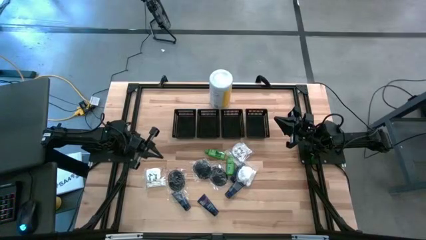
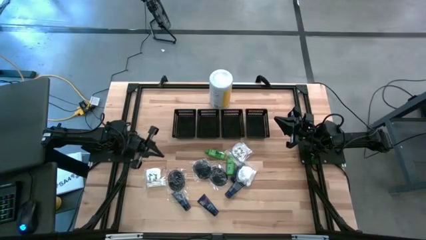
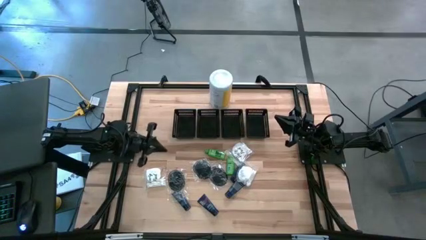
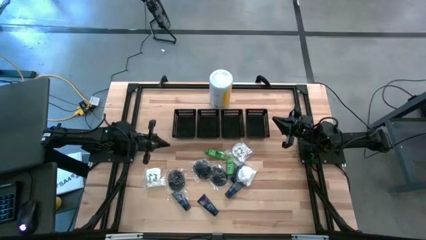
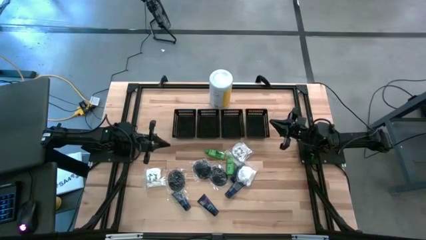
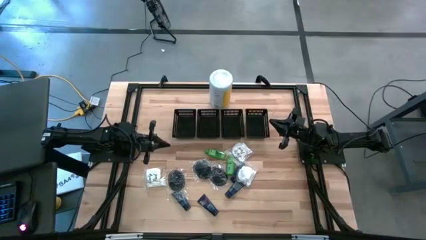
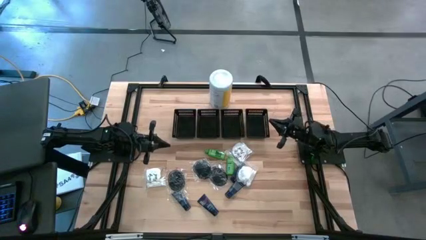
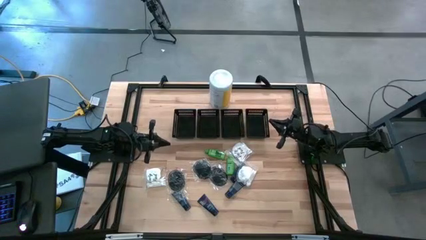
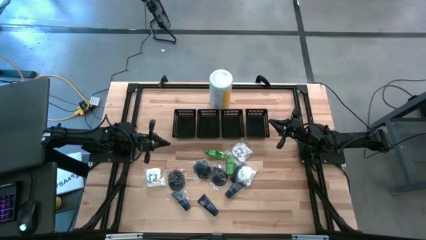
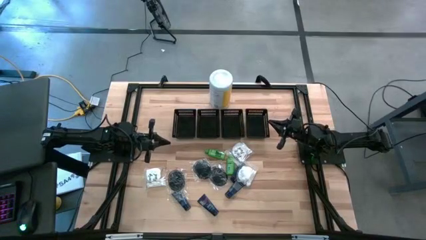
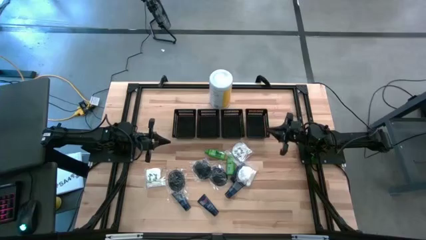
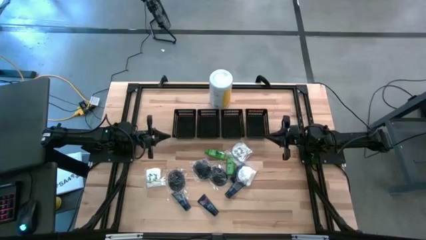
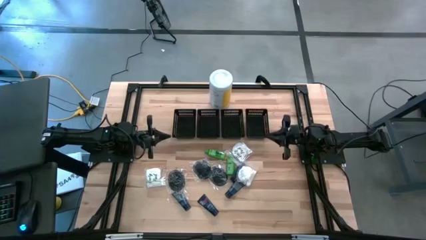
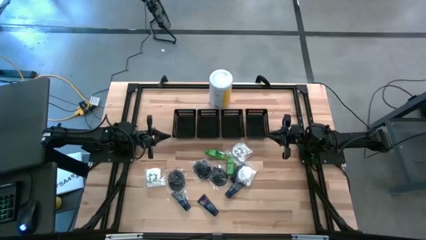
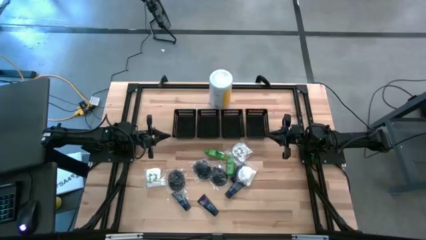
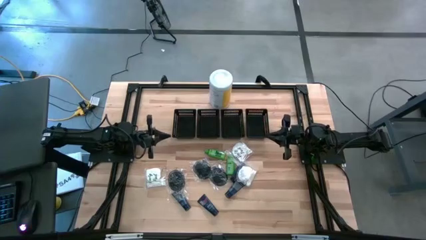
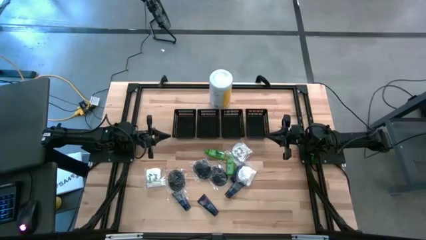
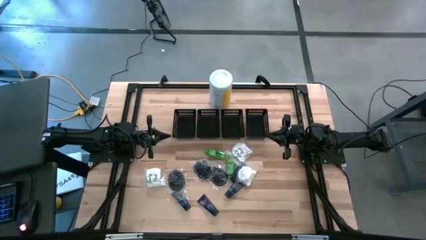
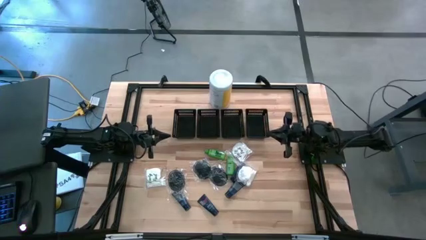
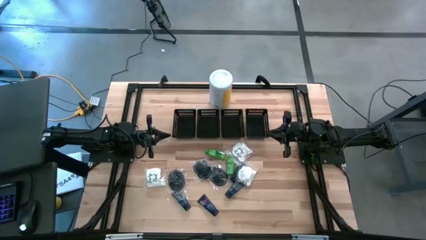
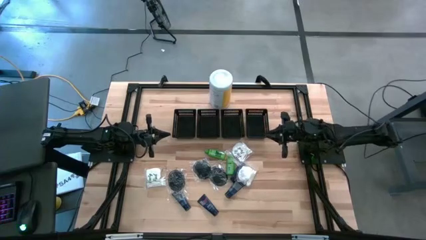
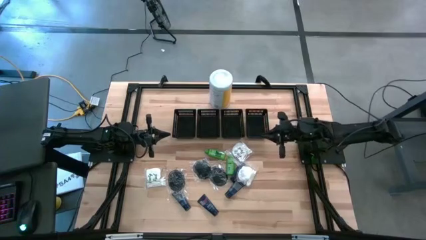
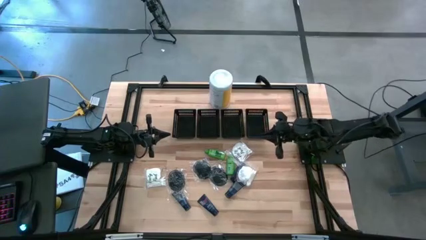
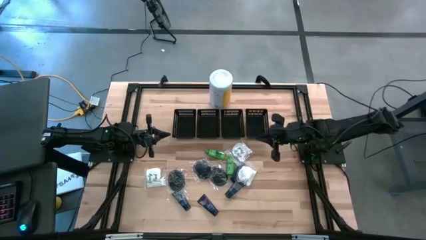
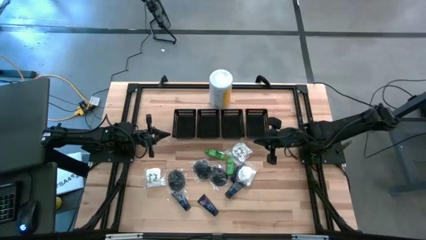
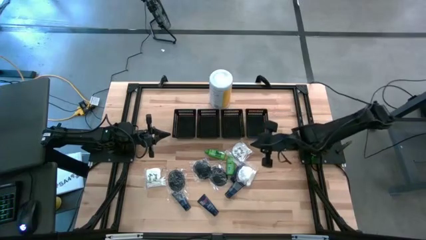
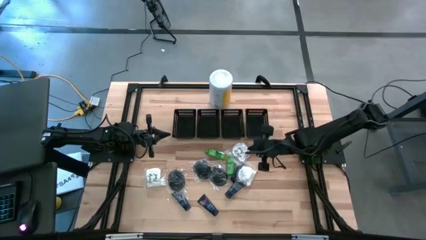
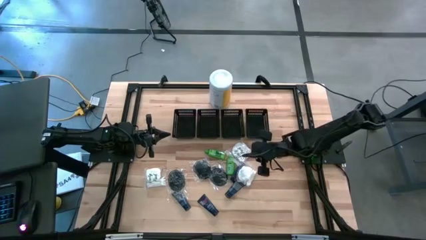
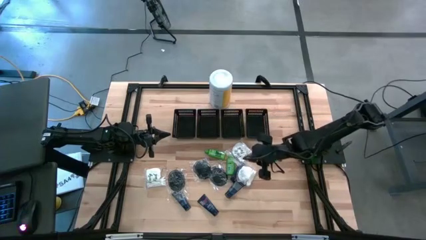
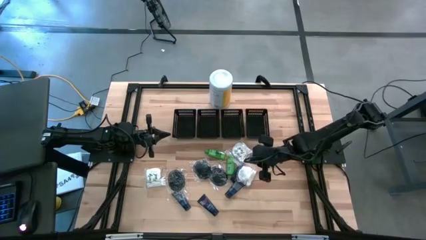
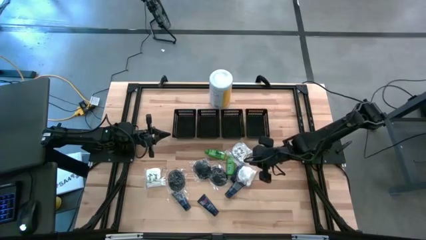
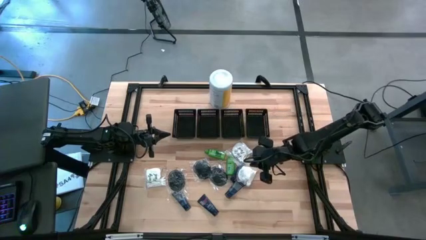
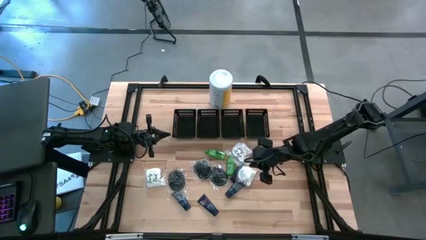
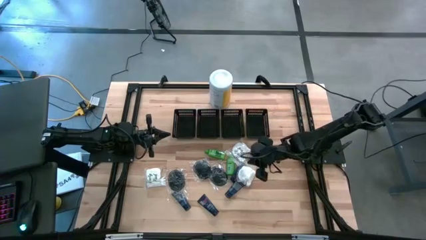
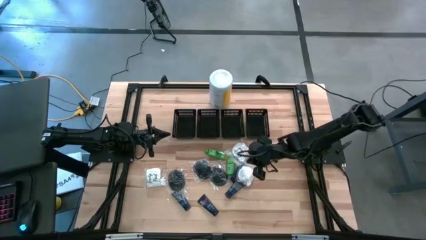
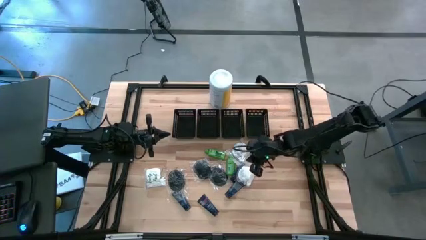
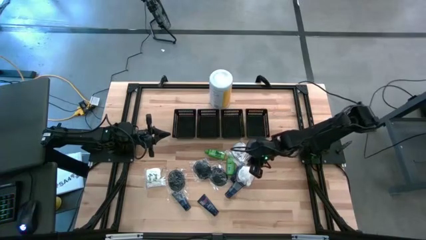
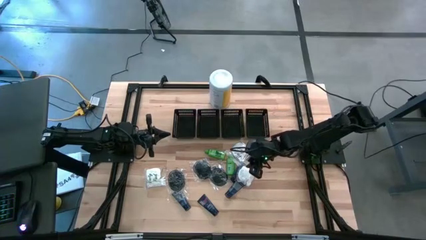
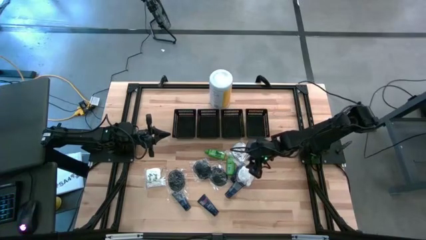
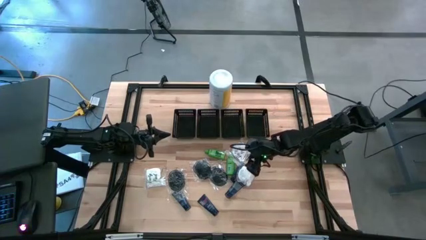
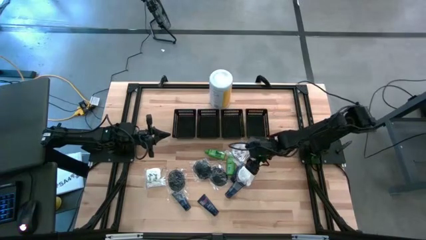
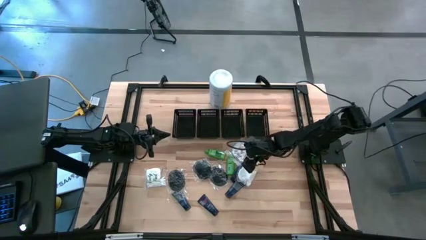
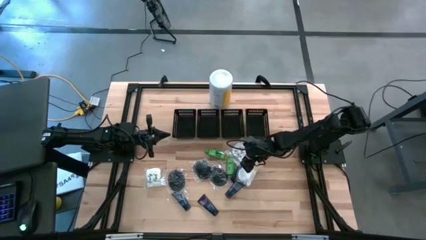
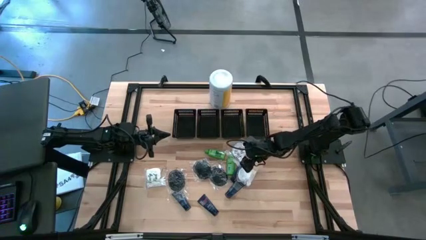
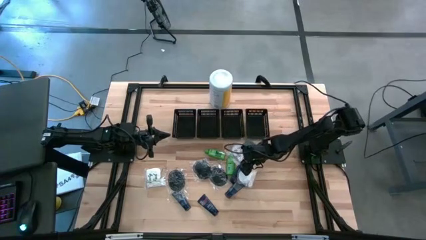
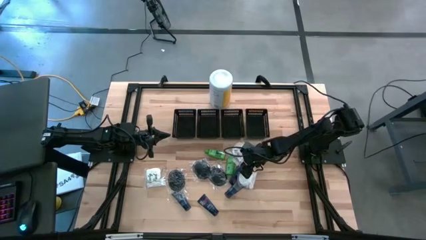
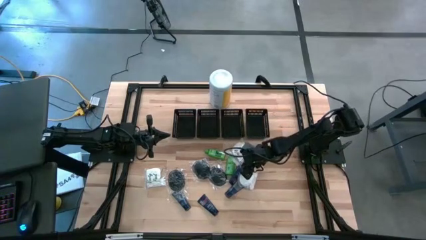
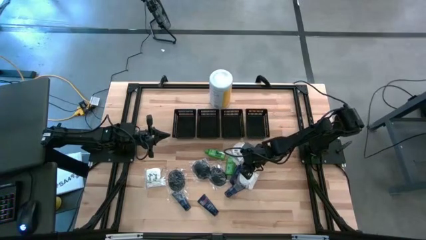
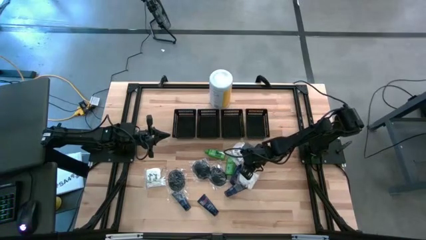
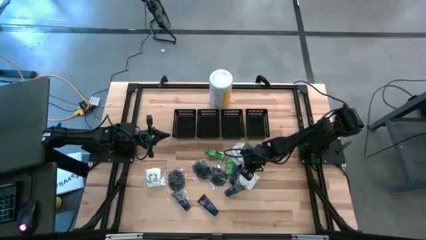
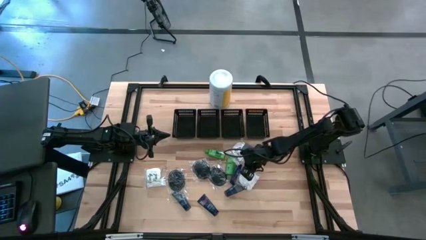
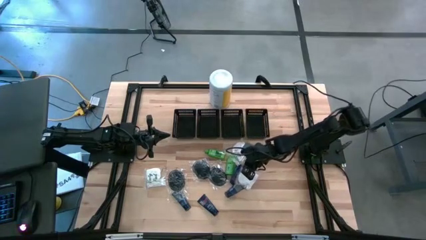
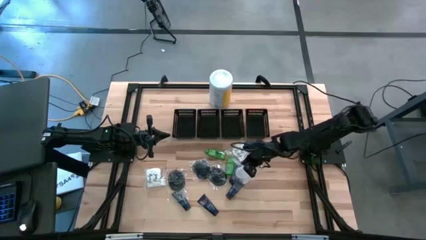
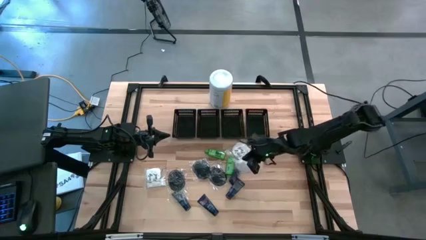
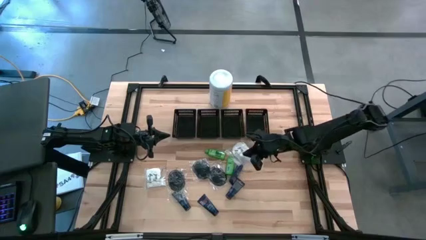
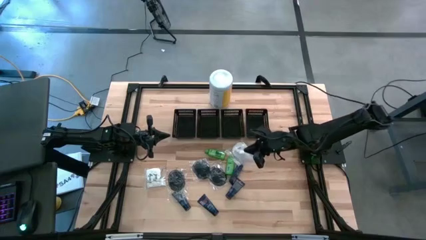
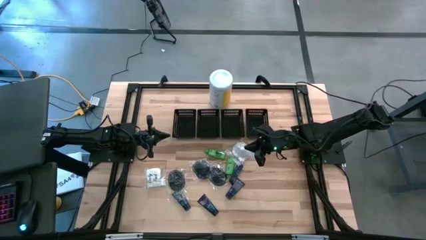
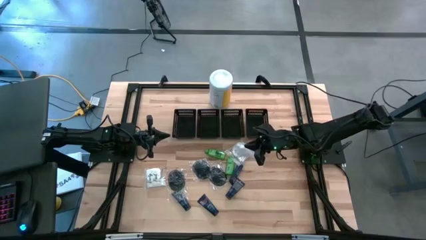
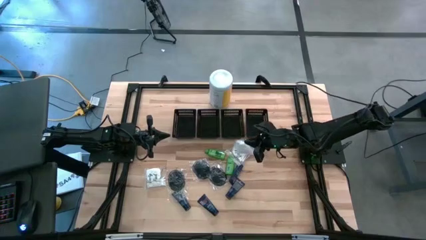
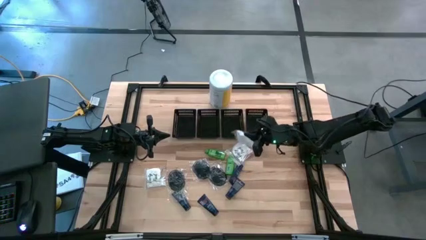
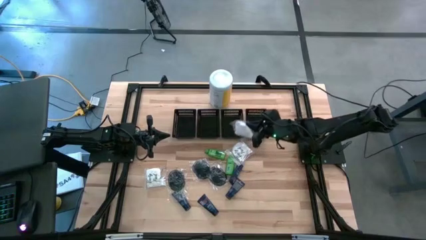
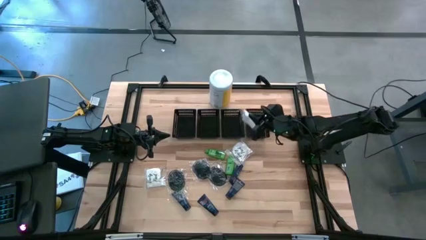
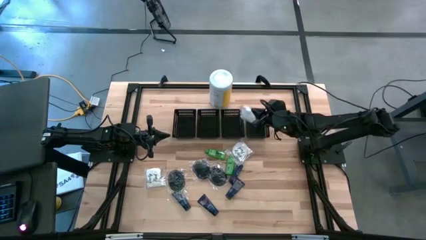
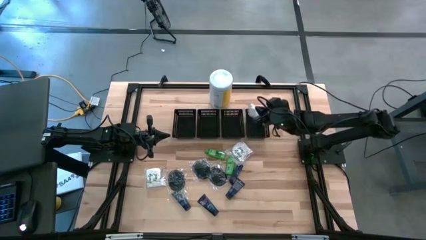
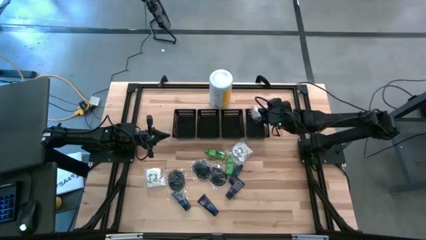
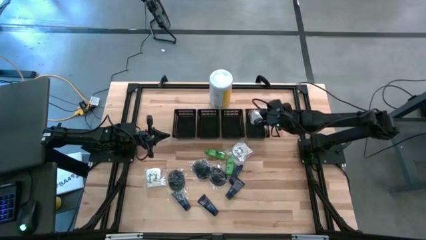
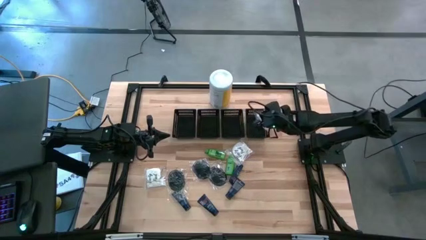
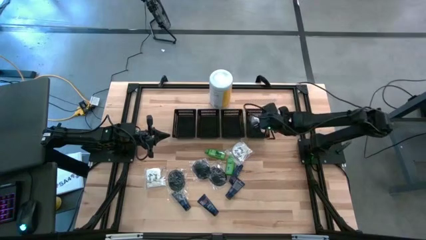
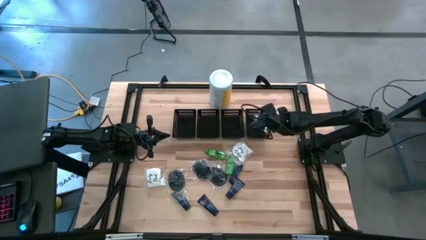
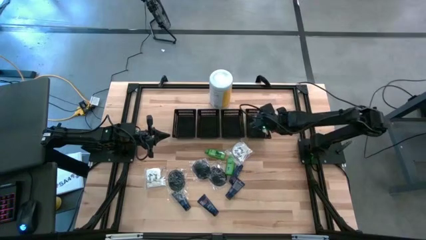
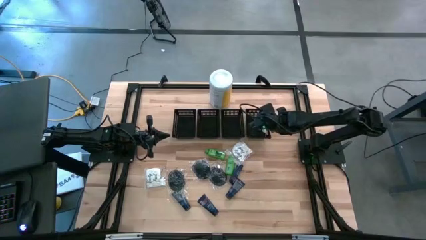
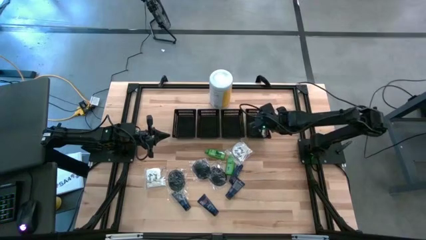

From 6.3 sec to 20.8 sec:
Task: Pick & Place Travel size toiletries
Put the bottom right cotton pack into the right black bin

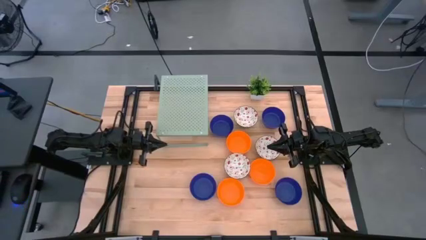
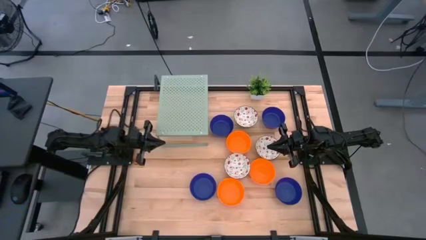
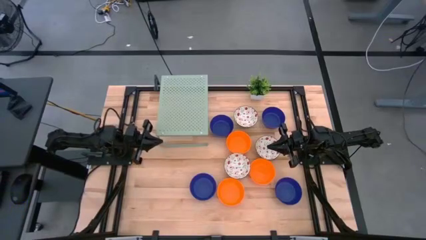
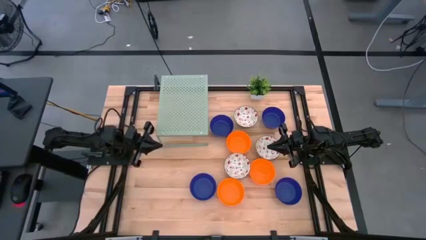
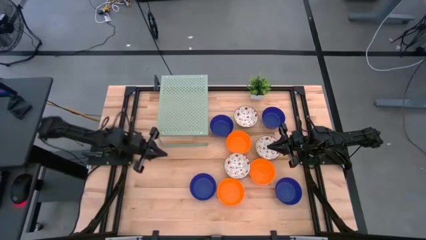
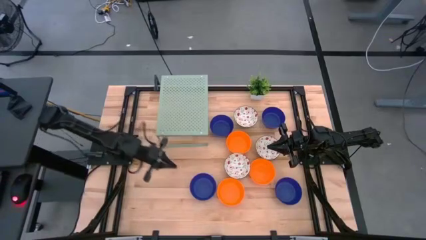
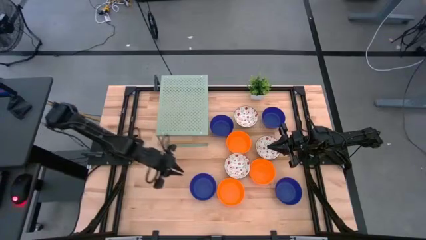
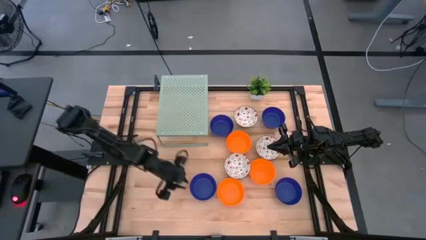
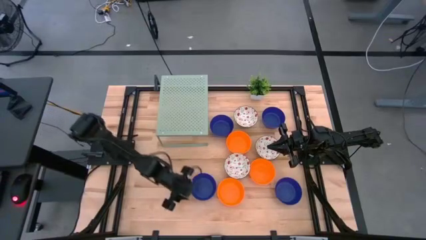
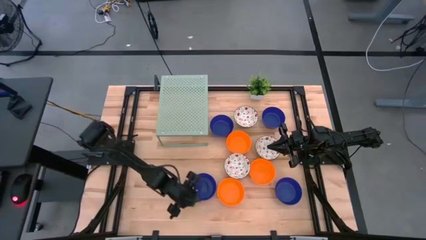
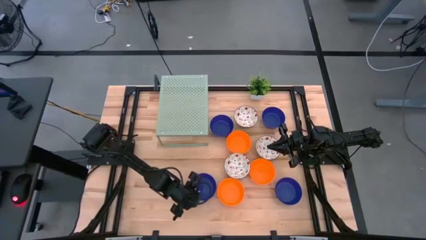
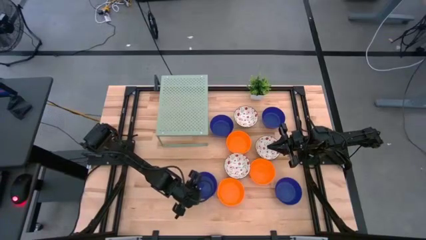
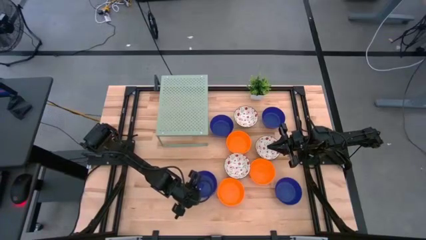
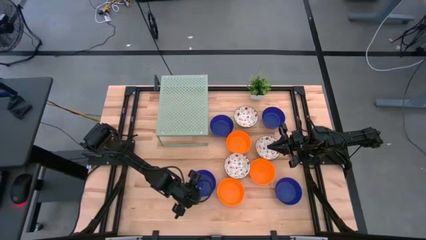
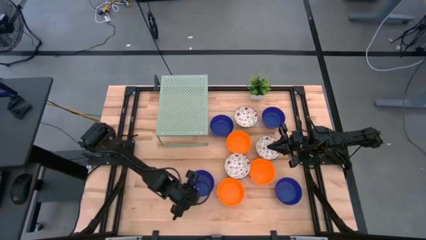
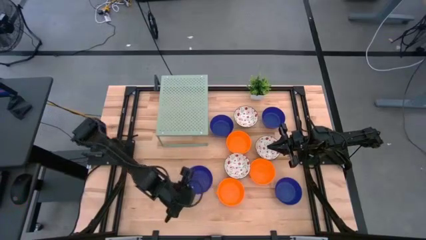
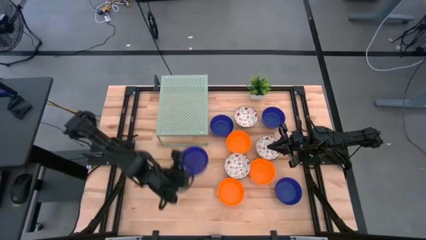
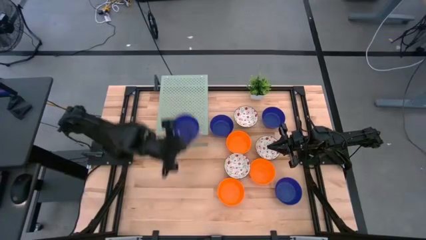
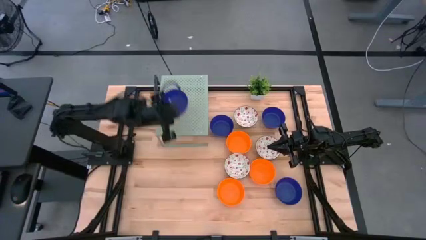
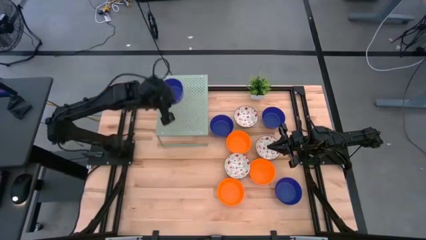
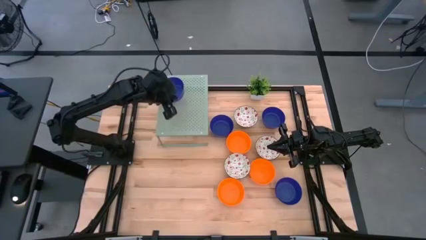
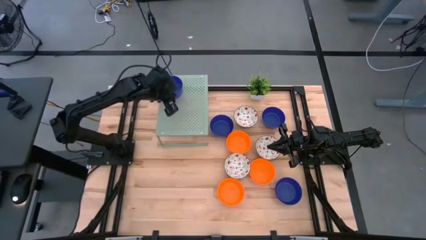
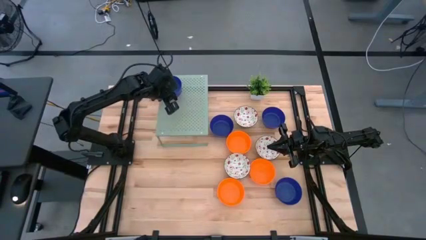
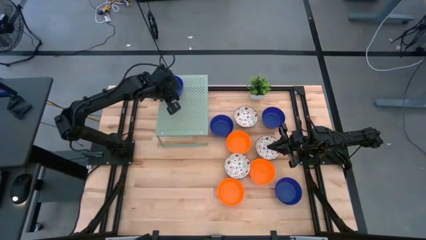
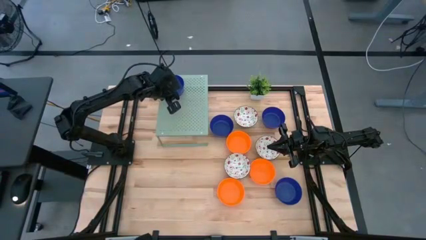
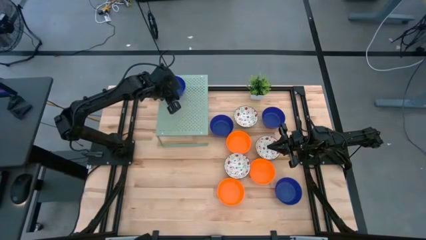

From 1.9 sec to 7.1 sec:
Task: Pick & Place Mini bowls
Put the left bottom blue bowl on the shelf
